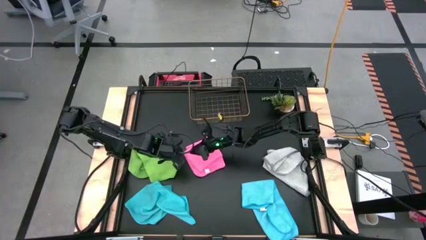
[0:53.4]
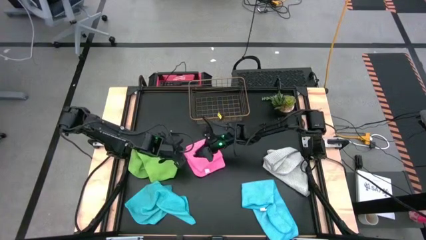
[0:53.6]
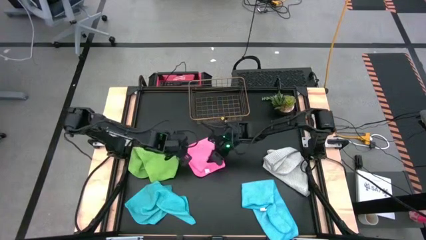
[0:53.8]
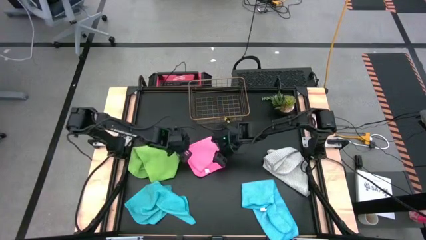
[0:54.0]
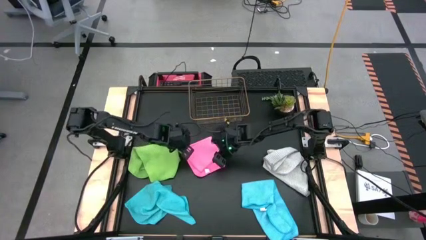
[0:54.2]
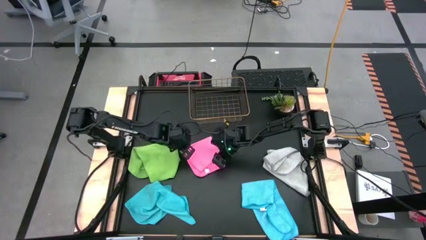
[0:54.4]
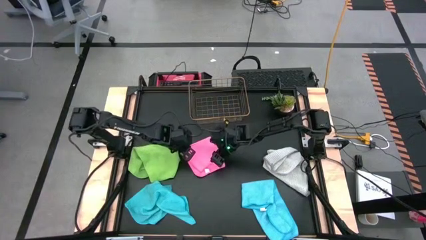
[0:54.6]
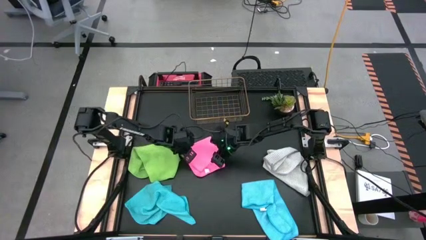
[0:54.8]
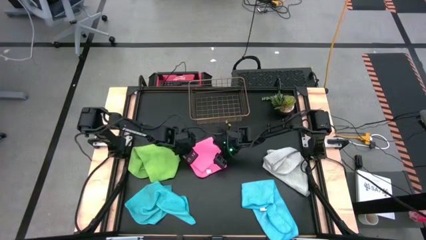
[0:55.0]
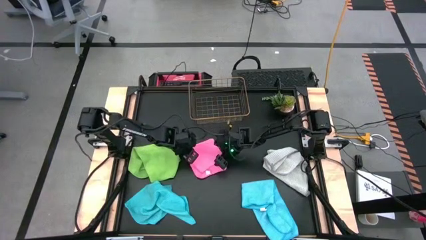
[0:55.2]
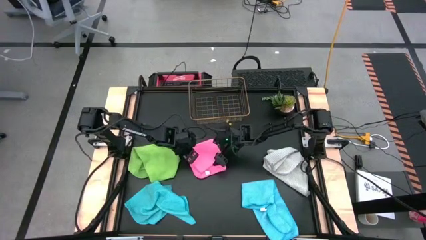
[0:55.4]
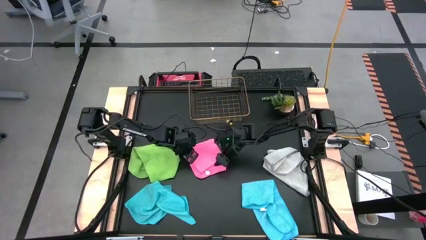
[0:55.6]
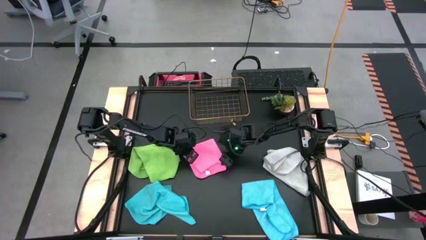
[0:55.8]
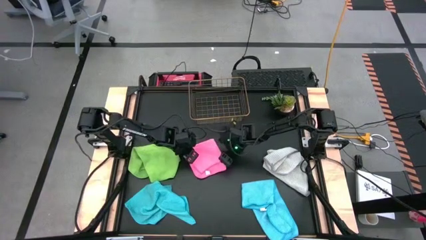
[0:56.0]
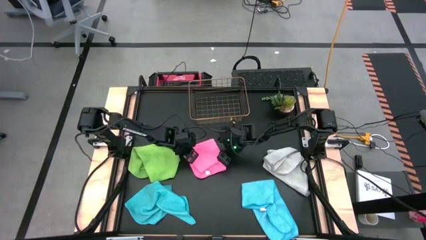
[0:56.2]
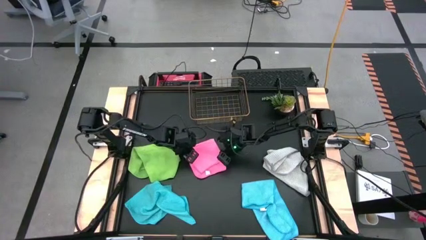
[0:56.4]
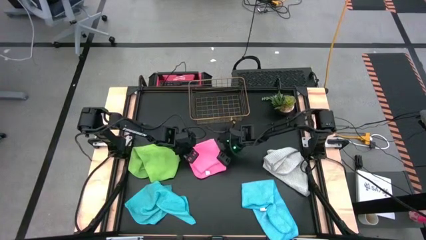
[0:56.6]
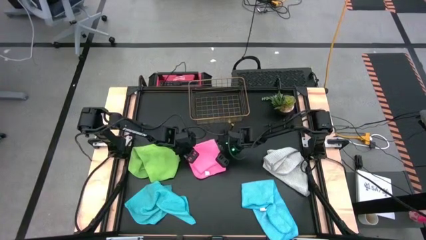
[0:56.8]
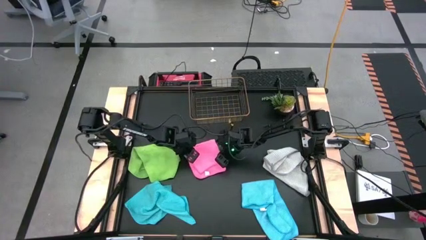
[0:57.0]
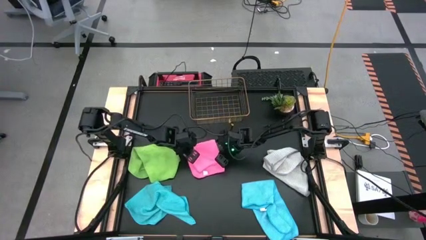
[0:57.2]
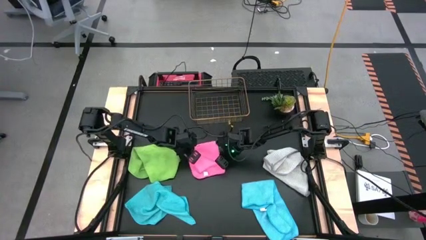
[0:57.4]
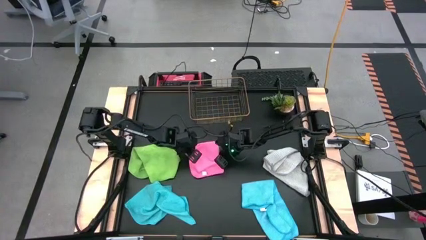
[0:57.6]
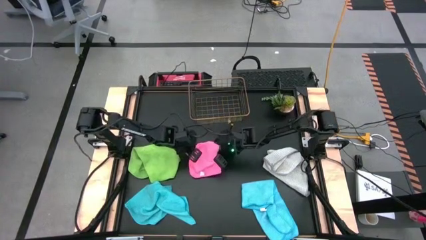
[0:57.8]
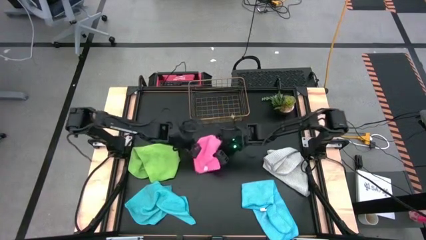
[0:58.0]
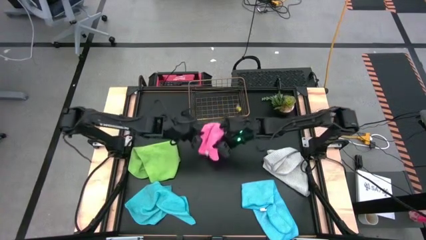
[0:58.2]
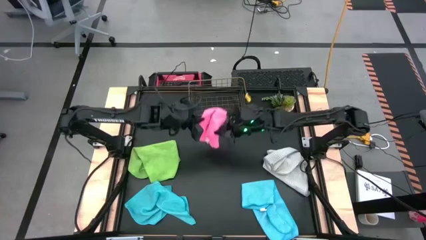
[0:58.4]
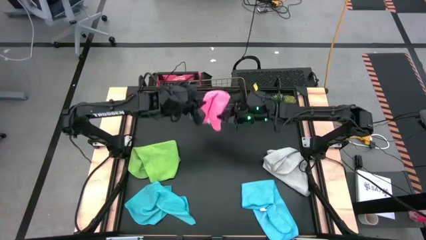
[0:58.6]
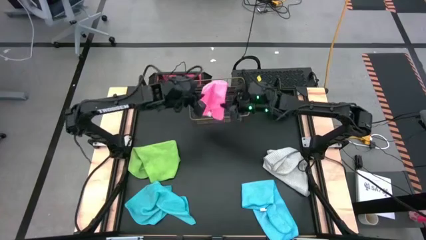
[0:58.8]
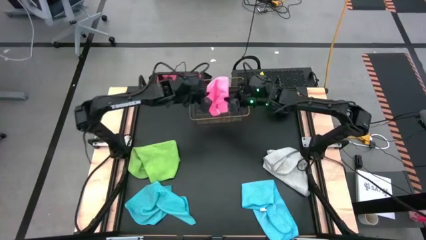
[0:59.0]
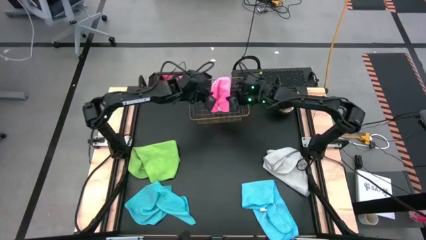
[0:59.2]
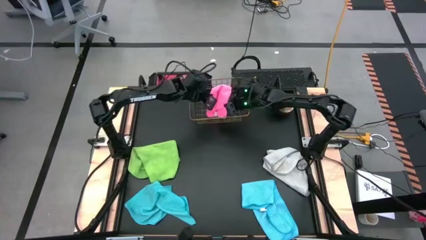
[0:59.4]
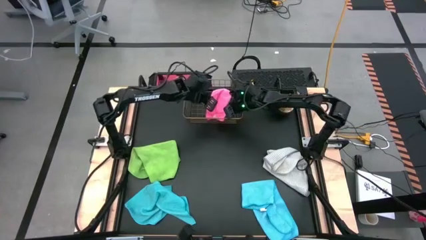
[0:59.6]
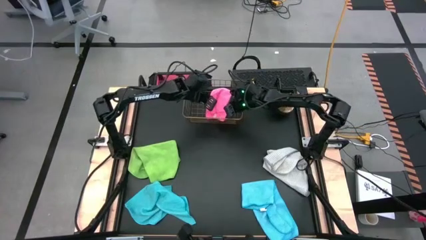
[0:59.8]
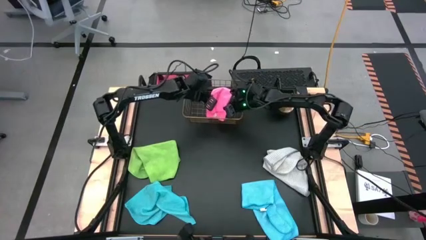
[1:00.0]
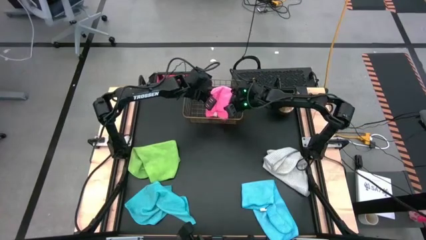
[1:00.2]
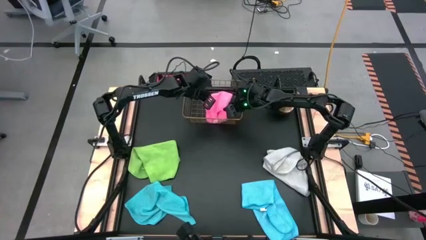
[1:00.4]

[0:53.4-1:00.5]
Task: Fold microfiber towels
Put the folded pink microfiber cloth in the wire basket

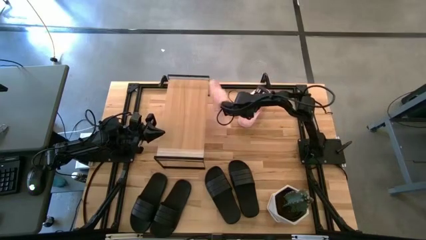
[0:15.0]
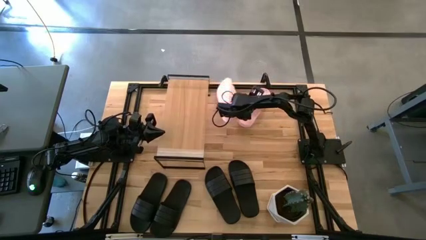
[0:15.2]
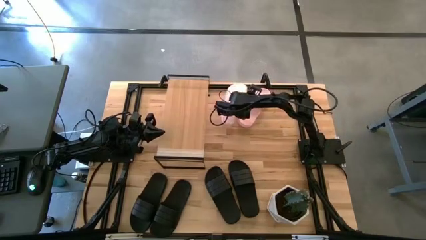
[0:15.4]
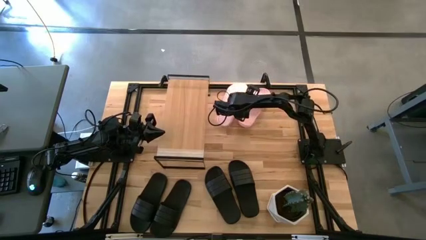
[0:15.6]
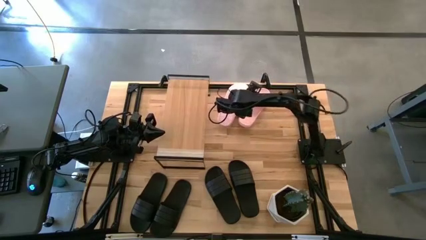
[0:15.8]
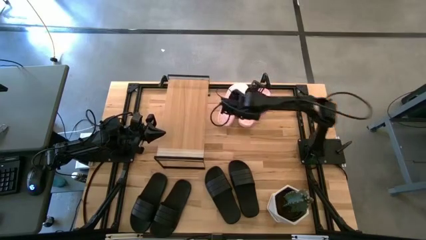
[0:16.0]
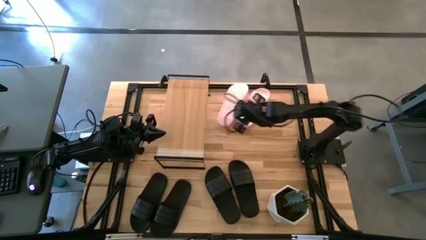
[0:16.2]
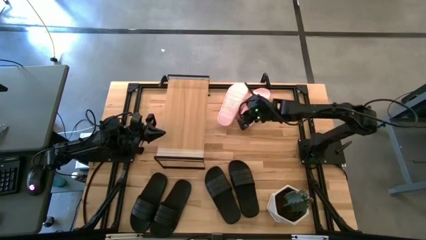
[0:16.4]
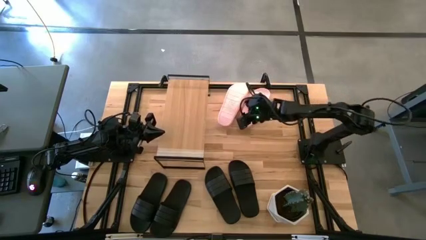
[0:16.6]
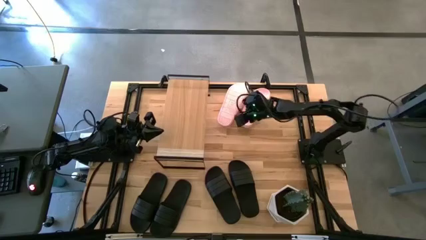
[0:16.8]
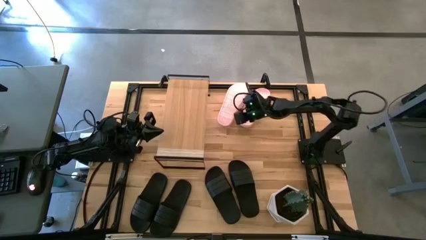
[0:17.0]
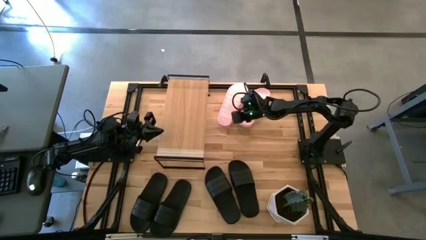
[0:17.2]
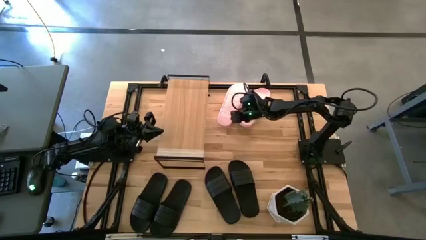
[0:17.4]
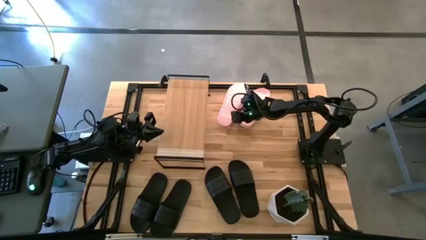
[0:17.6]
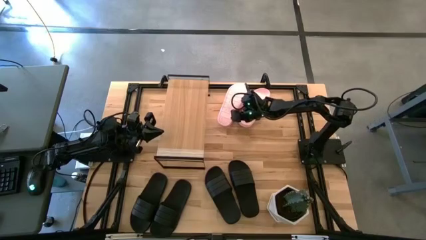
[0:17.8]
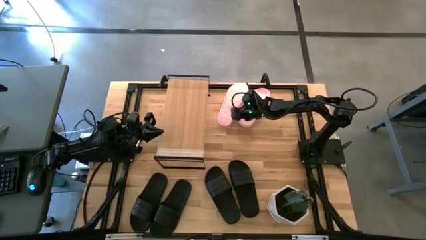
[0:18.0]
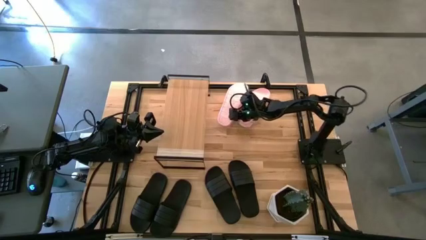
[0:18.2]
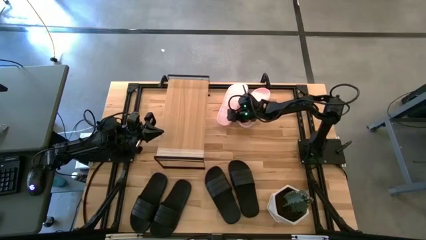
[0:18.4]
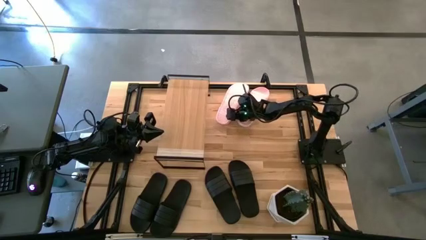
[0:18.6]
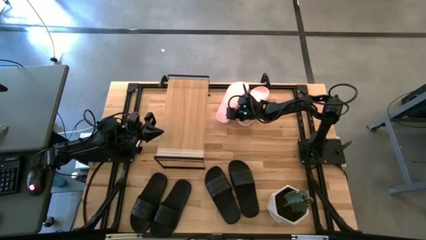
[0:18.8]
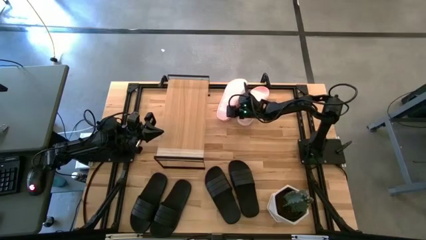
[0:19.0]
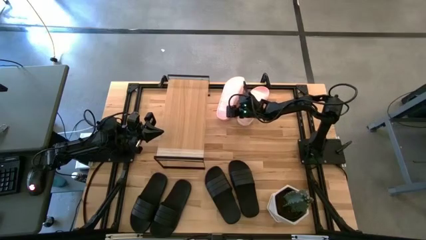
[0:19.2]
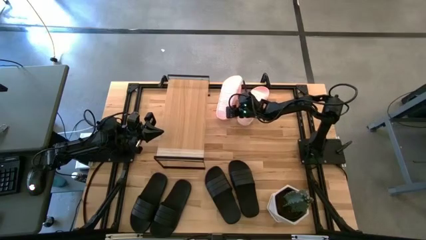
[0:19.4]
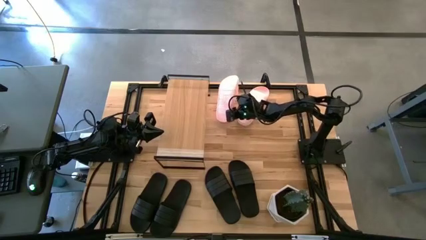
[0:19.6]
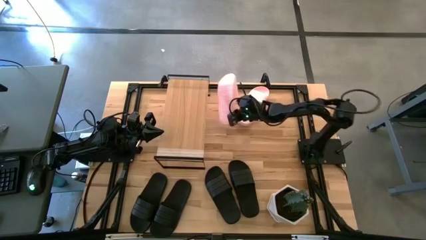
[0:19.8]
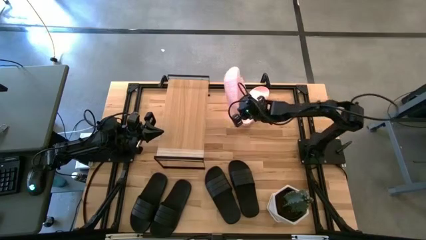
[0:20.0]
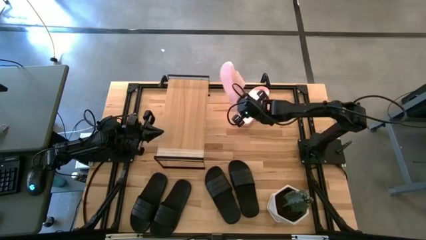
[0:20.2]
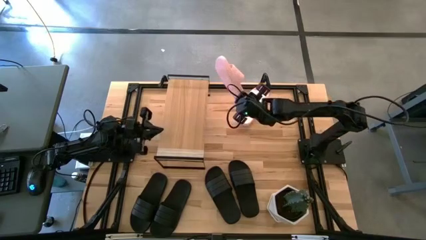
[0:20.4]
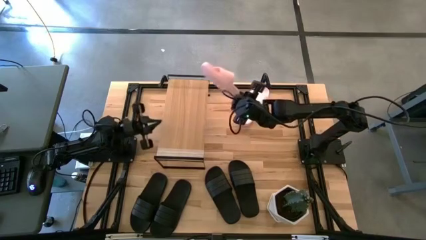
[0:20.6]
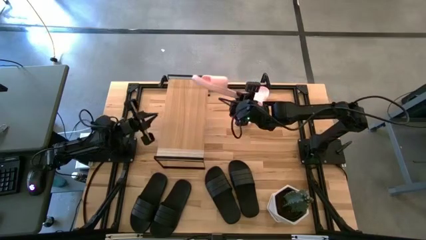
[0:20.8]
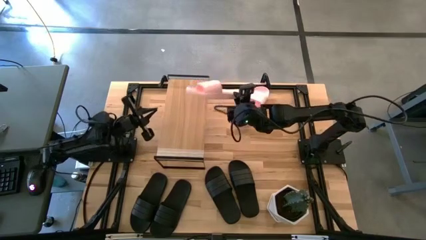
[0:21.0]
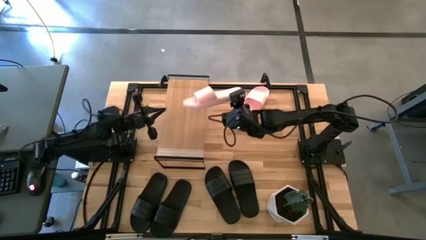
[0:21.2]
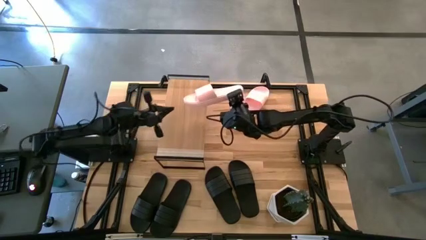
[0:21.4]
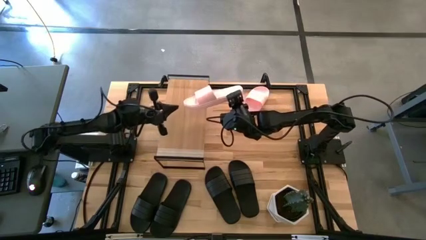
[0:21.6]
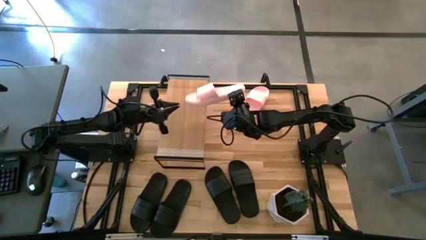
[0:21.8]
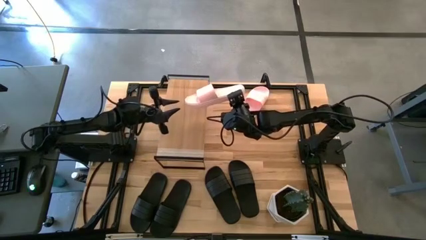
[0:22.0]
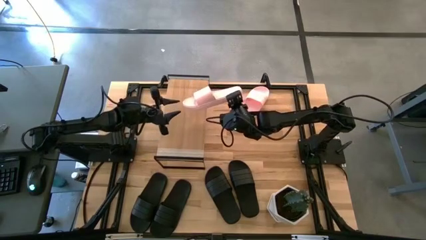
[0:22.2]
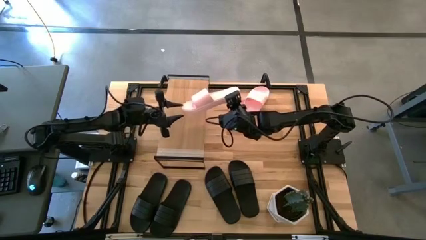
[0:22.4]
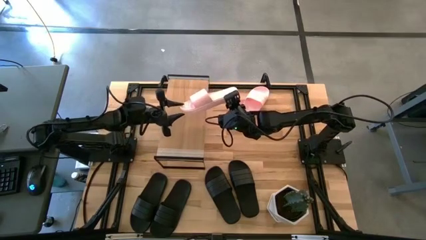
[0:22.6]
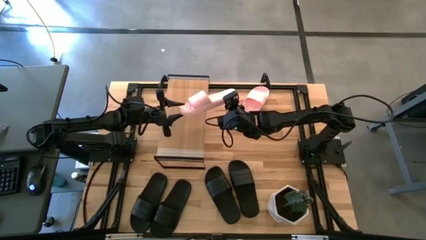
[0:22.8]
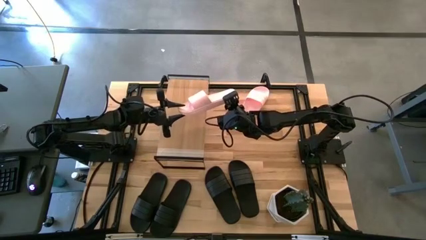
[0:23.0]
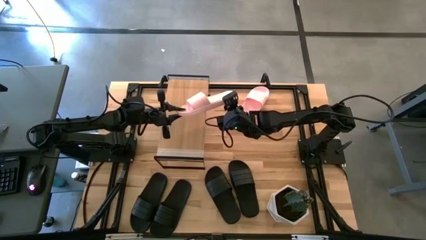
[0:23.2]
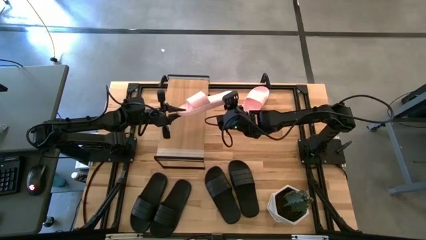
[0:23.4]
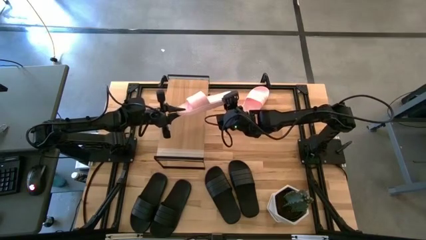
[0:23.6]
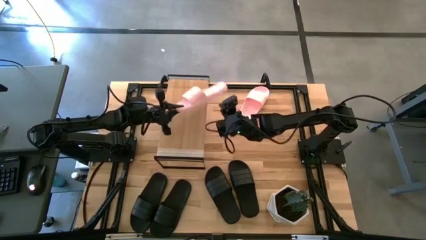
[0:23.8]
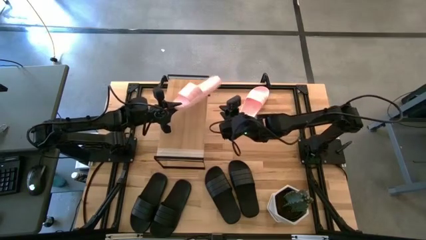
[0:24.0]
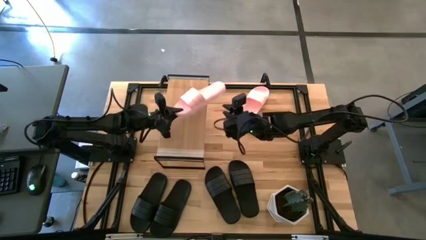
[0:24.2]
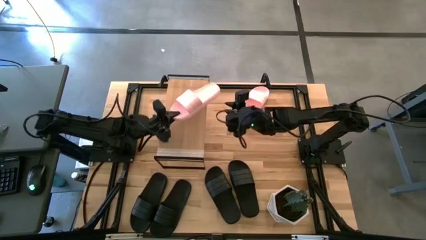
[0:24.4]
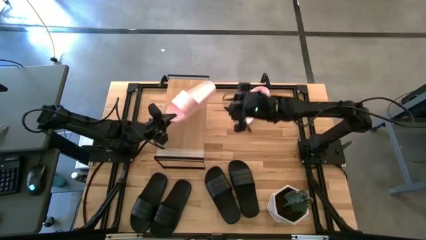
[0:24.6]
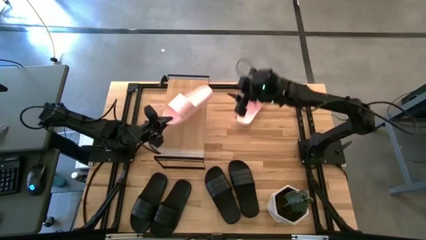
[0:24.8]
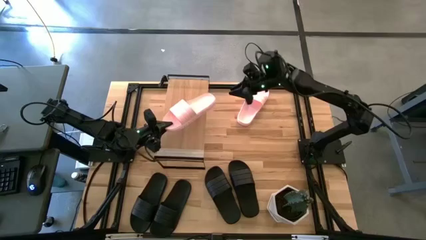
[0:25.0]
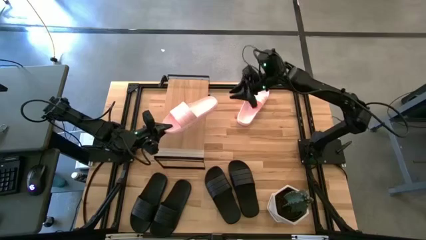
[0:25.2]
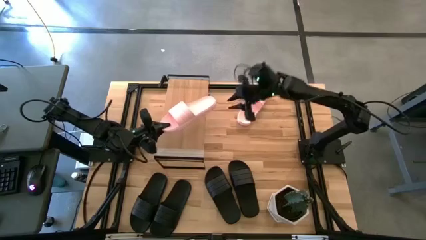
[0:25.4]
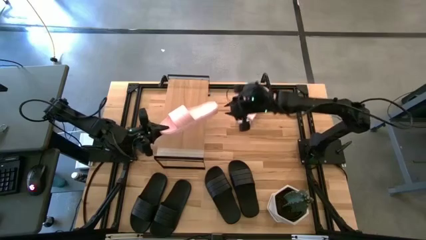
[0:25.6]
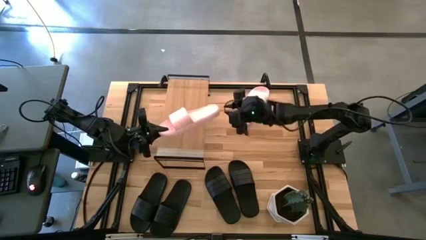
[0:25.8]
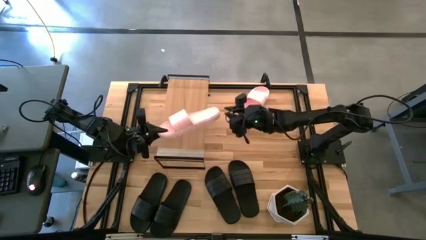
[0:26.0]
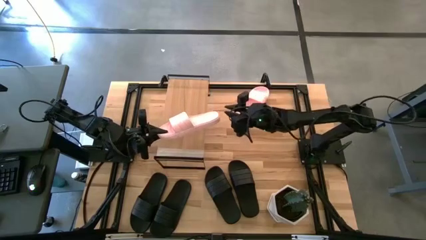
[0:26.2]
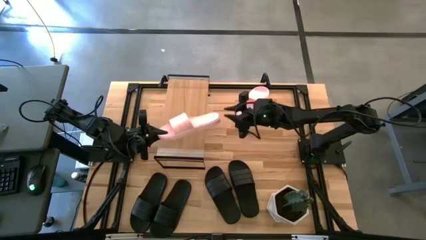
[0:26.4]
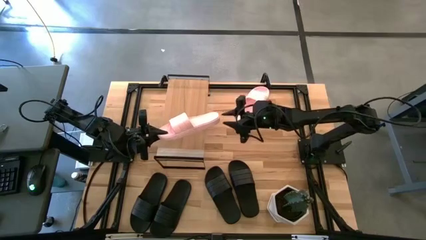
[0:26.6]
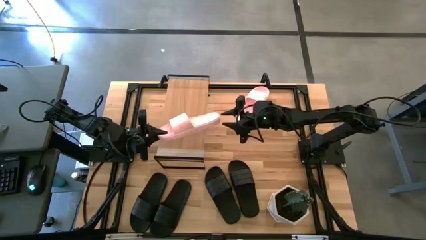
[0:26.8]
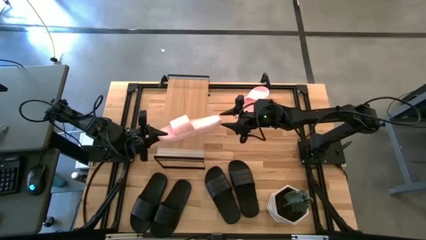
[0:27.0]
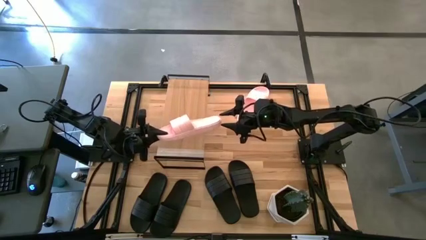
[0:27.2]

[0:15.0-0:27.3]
Task: Pick and place slides into the shelf
Put the pink slide on the shelf
